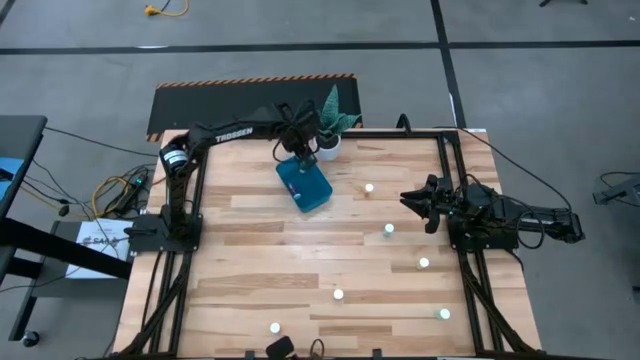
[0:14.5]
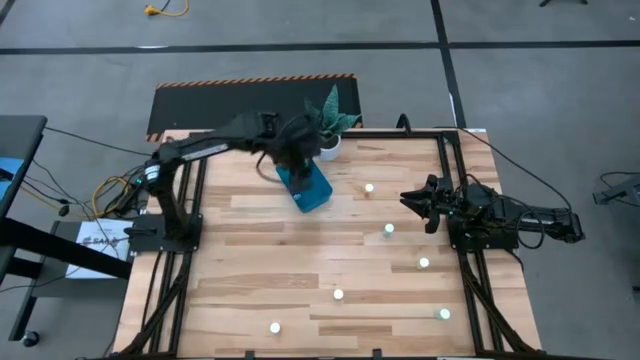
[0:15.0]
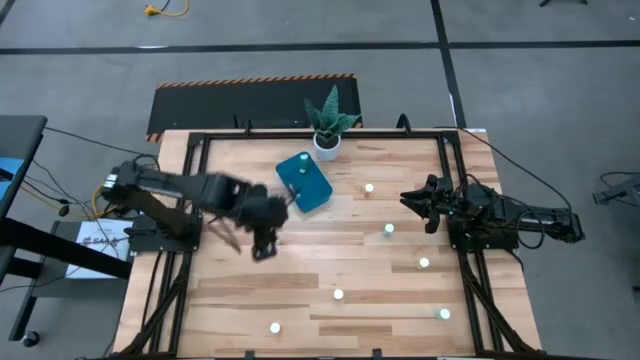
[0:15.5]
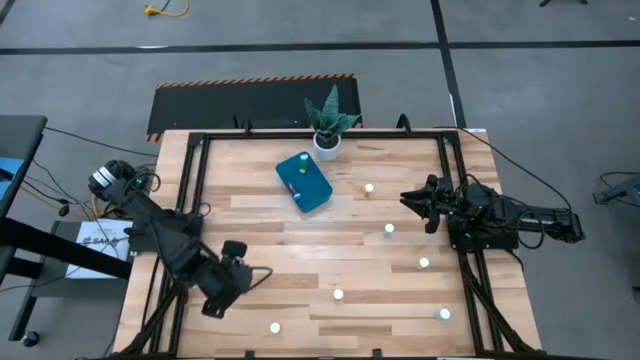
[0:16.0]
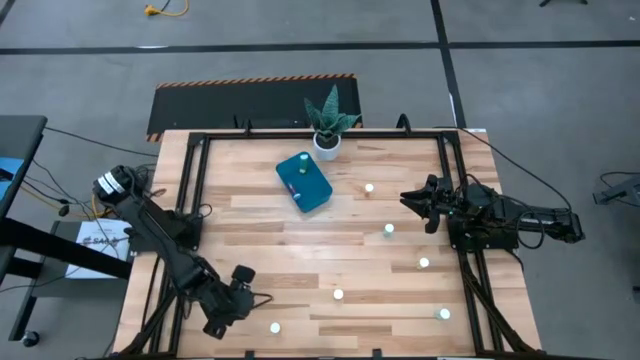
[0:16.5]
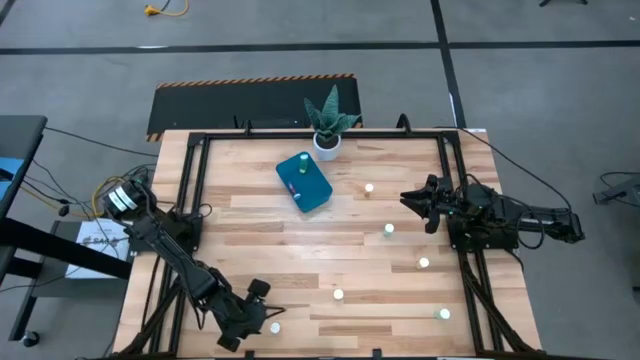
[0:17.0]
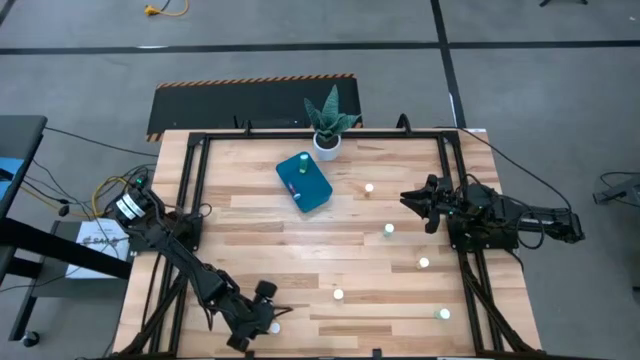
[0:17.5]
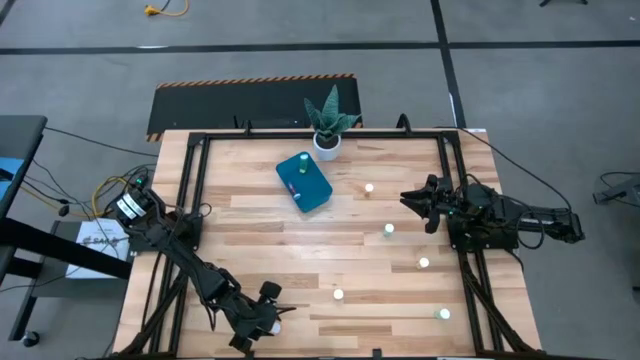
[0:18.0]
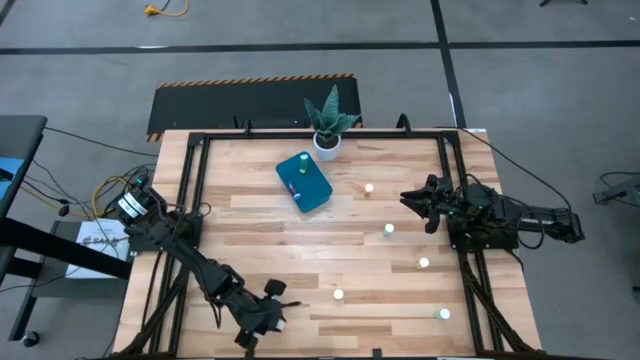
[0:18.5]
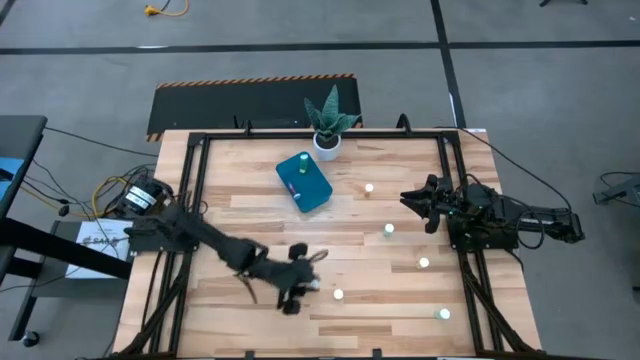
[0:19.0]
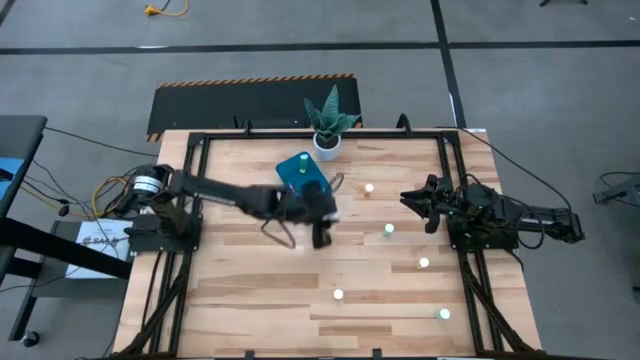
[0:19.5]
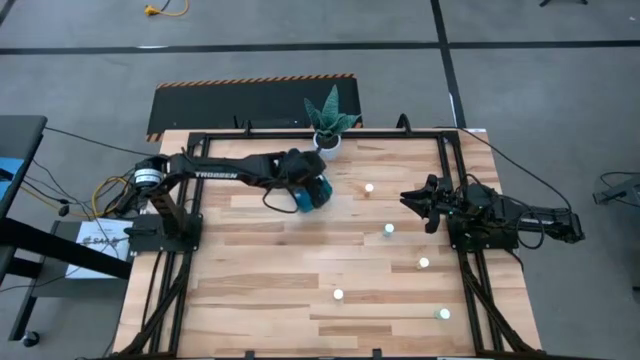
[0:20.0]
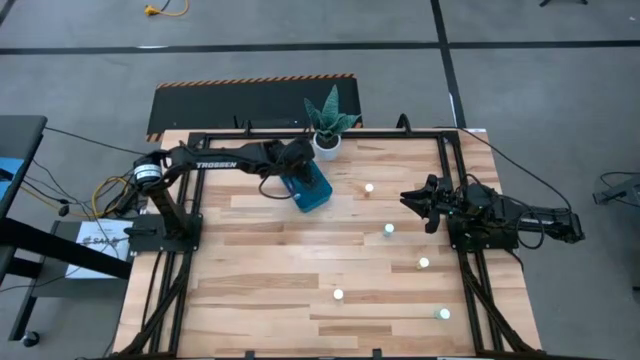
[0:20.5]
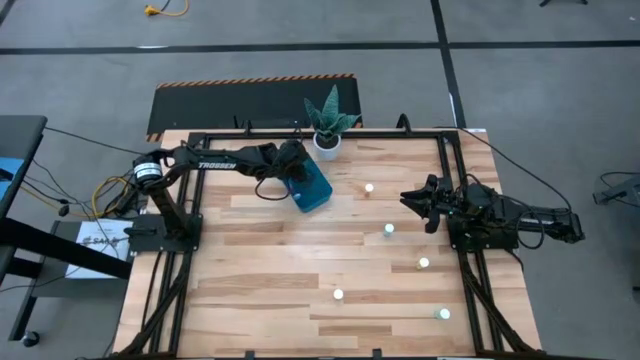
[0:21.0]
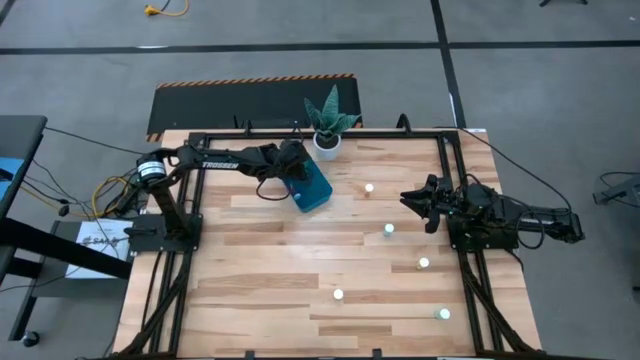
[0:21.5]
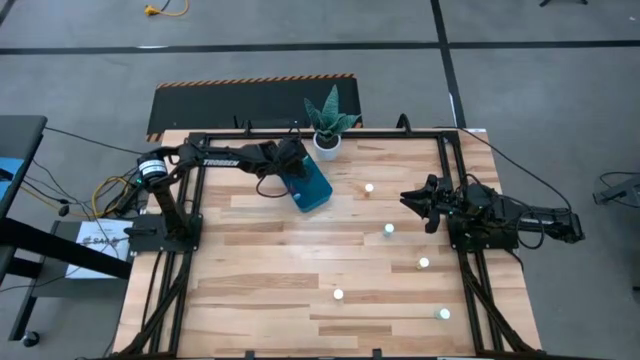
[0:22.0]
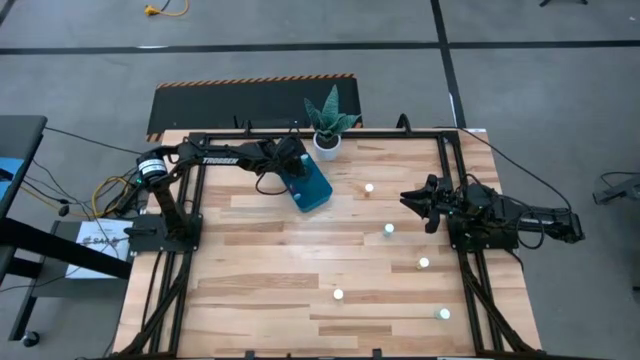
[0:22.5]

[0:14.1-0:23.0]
Task: Pick and place pill bottles into a basket
Put the orange pill bottle into the blue bin

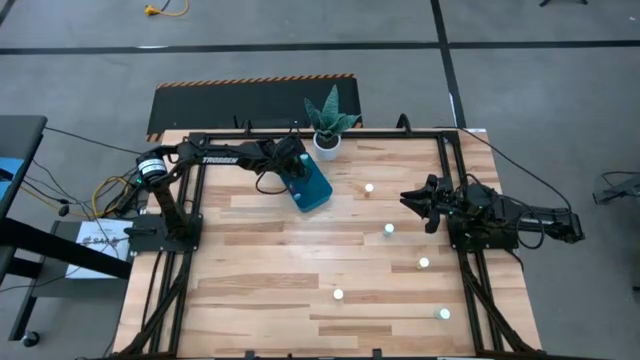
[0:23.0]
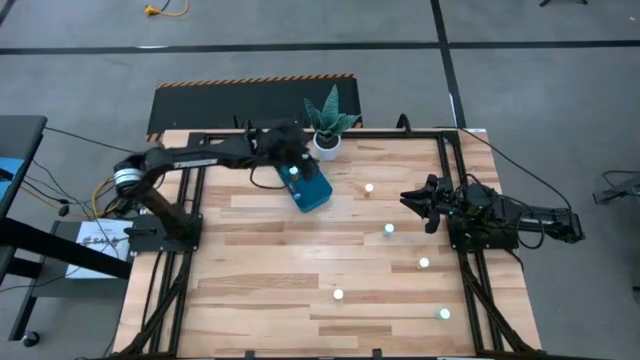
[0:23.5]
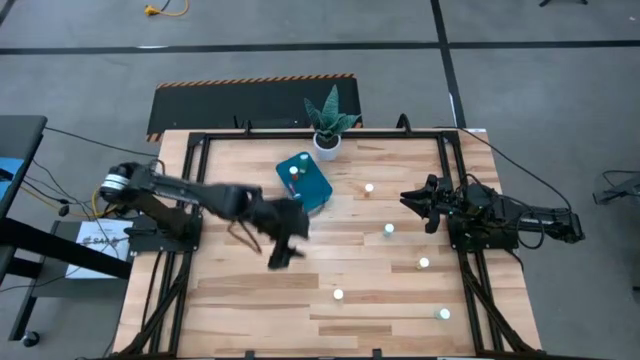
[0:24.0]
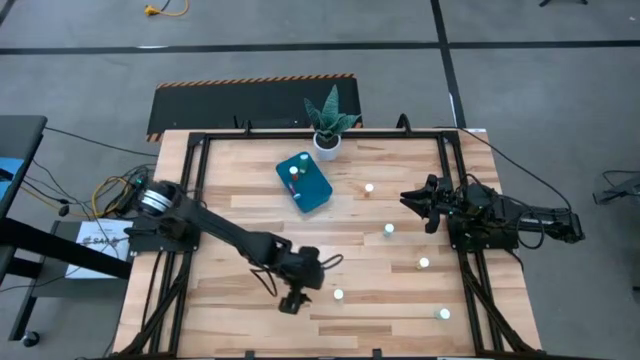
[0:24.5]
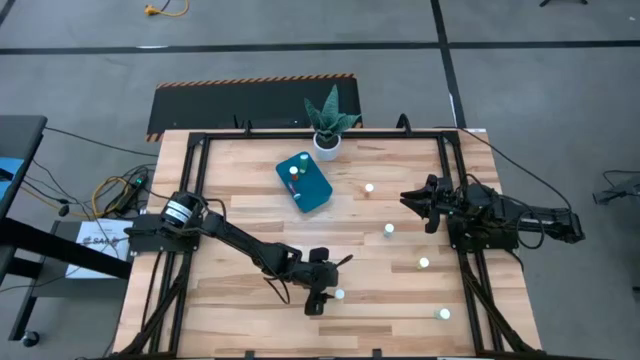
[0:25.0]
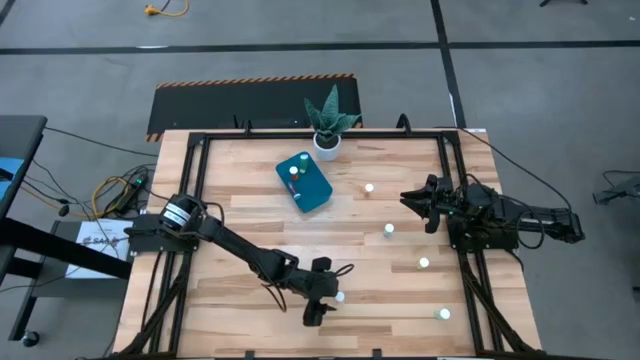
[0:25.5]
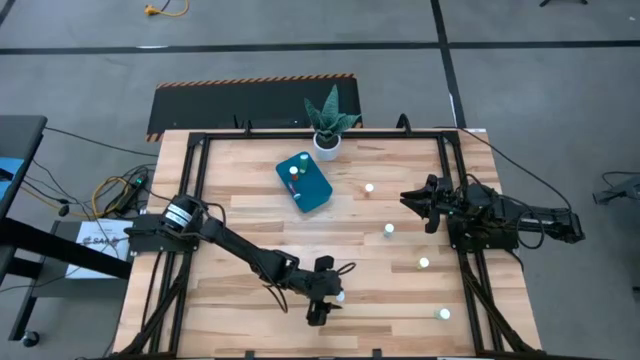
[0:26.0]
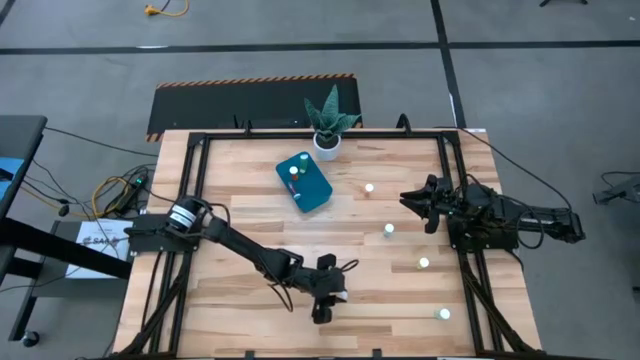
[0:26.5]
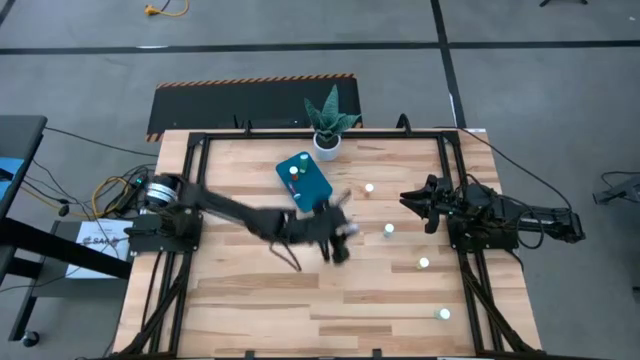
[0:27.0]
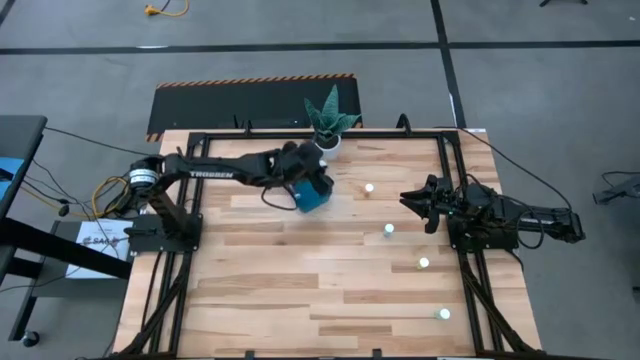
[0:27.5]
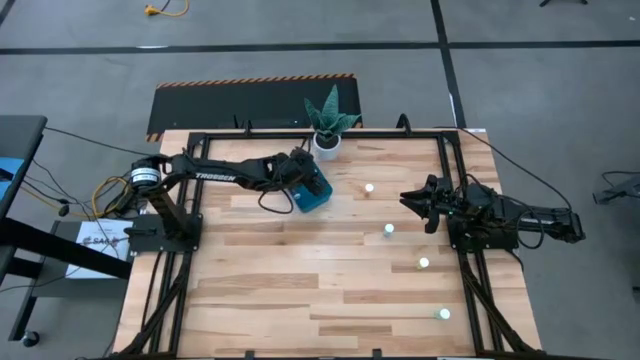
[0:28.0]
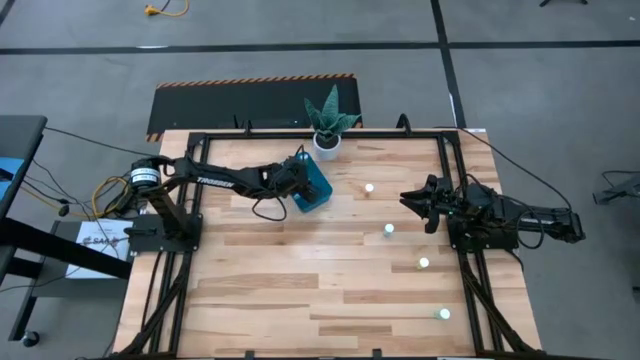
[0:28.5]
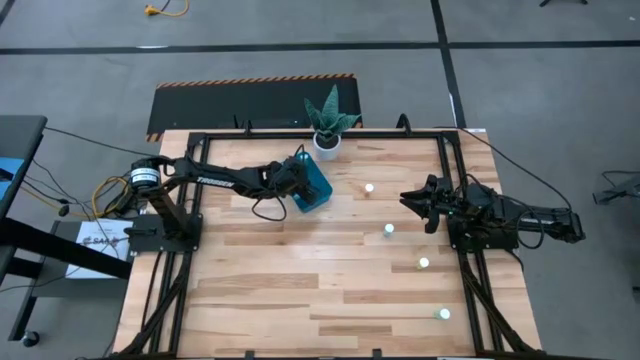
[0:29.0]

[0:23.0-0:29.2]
Put the bottom yellow pill bottle into the blue bin

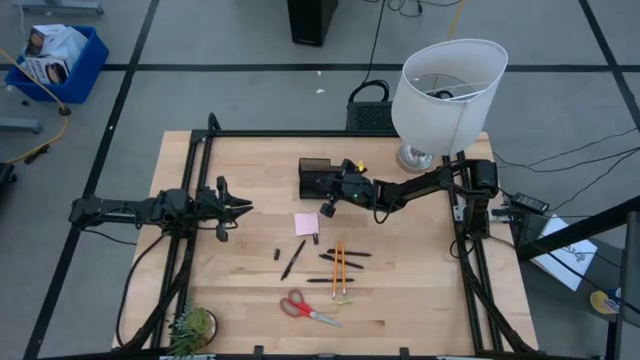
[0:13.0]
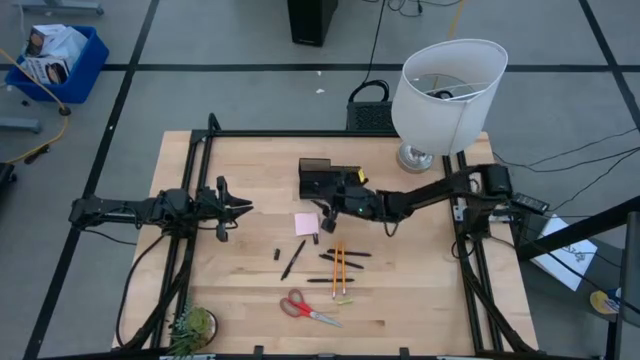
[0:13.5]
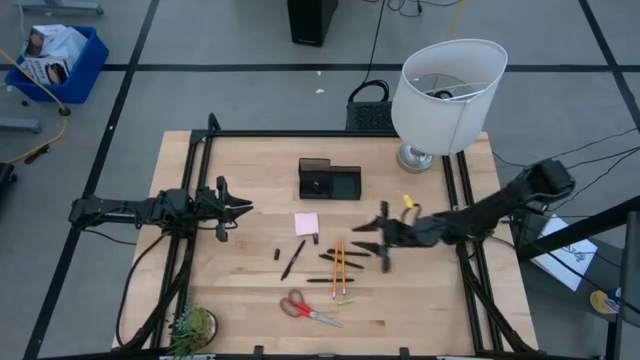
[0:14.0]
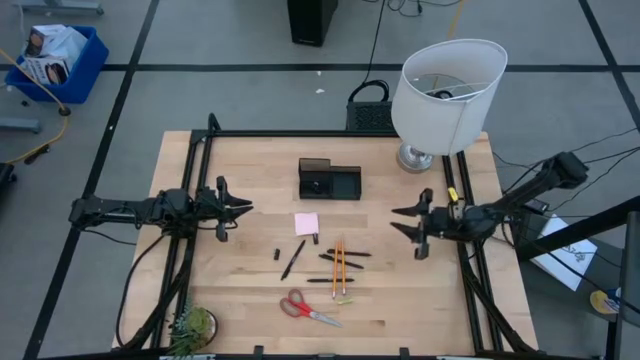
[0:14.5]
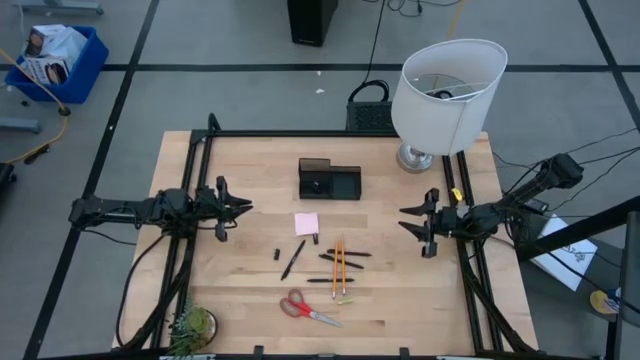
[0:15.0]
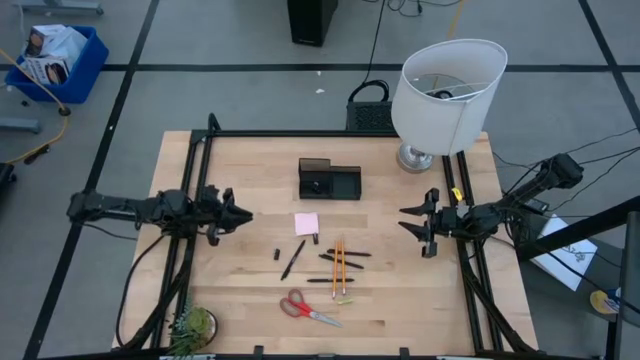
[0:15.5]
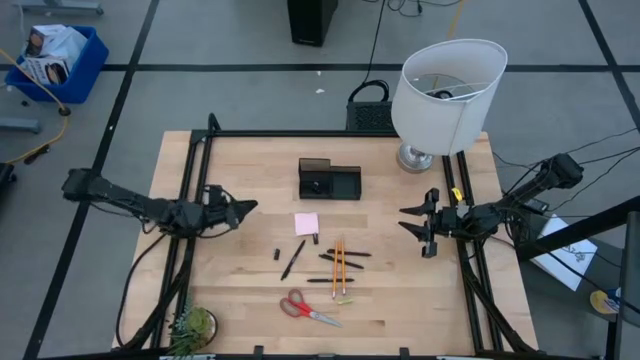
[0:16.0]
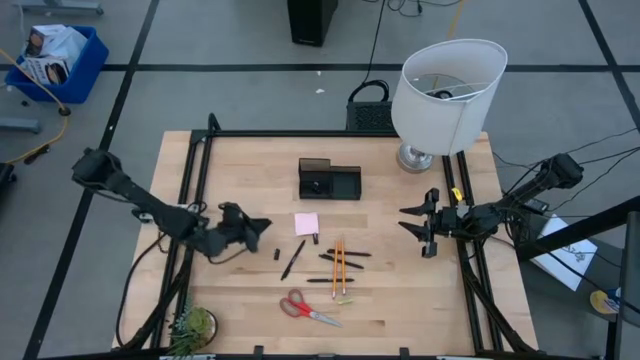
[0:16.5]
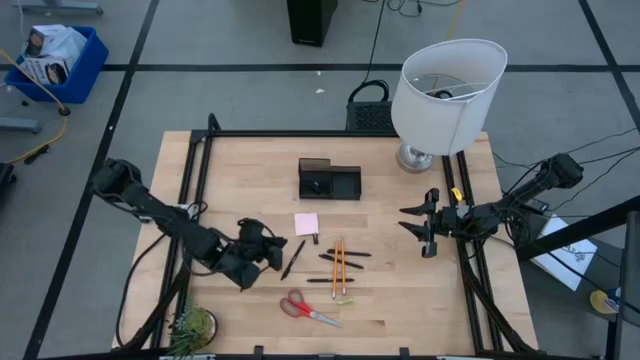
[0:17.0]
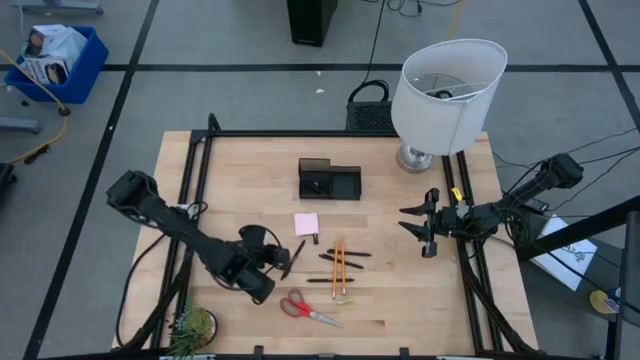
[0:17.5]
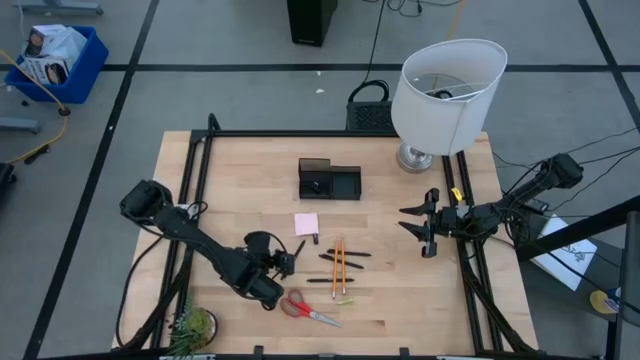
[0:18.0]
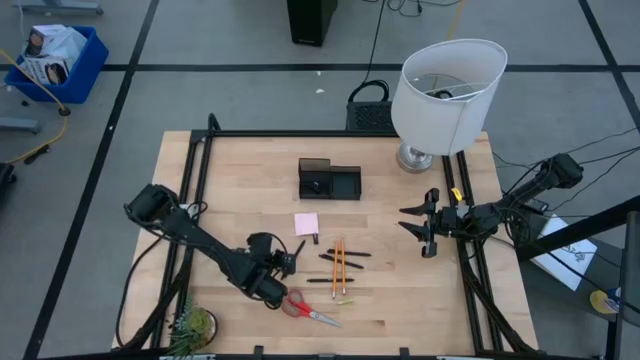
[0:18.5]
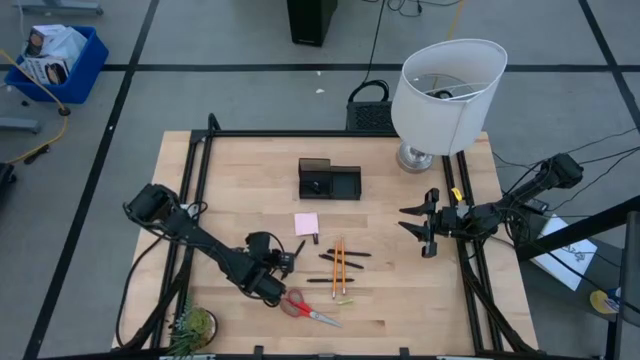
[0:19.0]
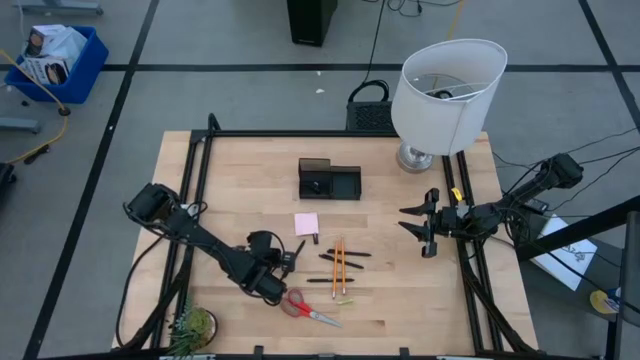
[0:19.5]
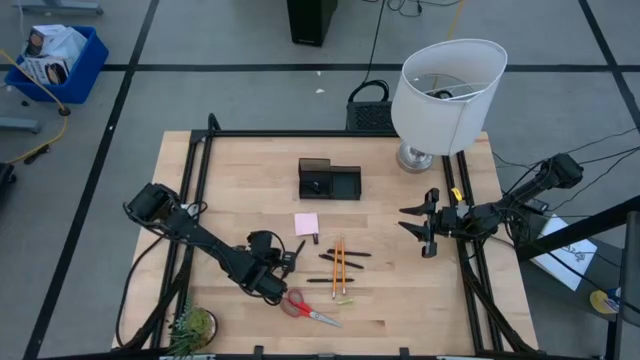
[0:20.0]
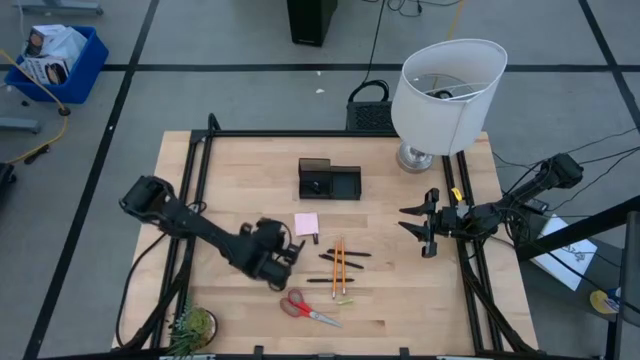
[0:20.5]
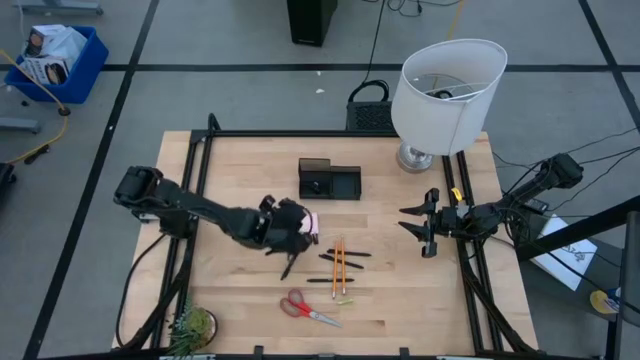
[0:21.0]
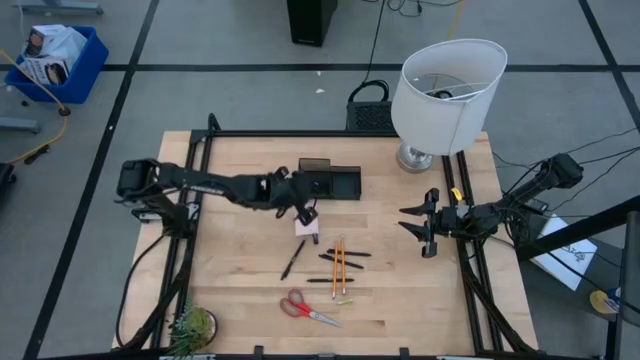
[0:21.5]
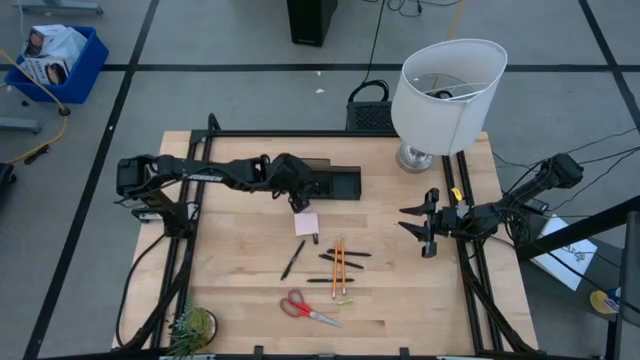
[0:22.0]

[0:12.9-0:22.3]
Task: Pick and place office supplies into organizer
Put the black binder clip into the desk organizer
